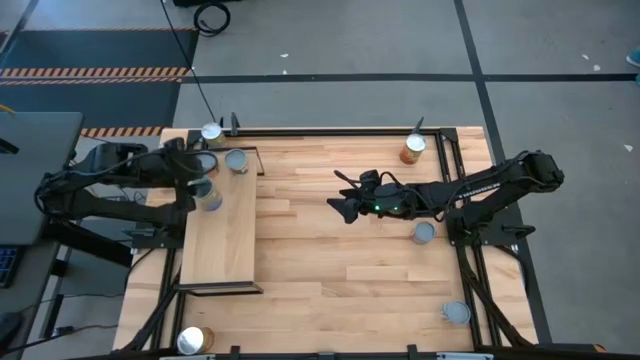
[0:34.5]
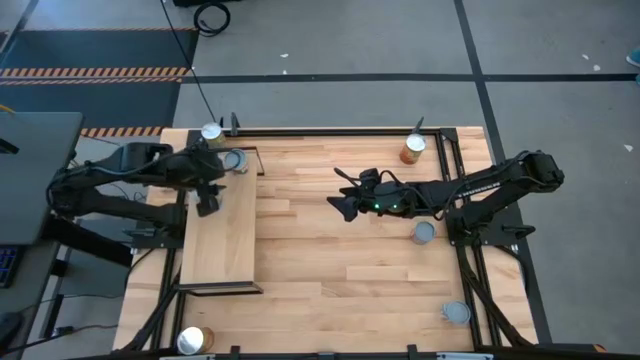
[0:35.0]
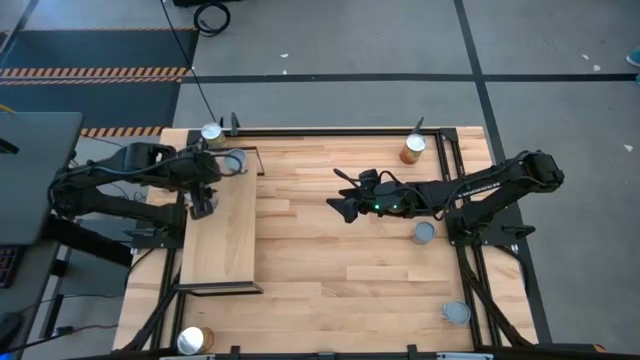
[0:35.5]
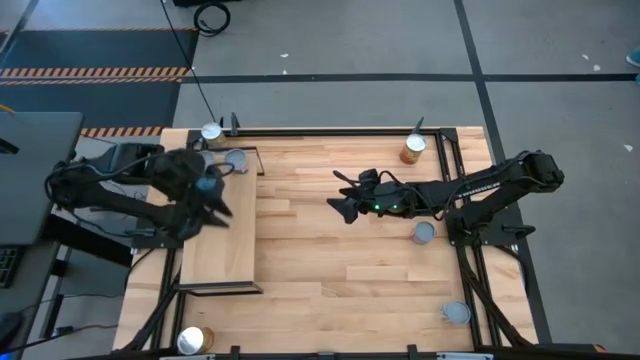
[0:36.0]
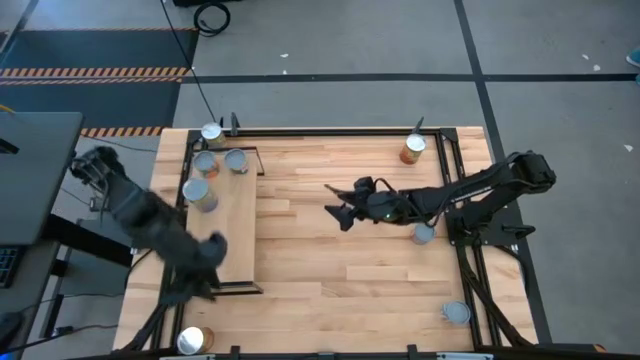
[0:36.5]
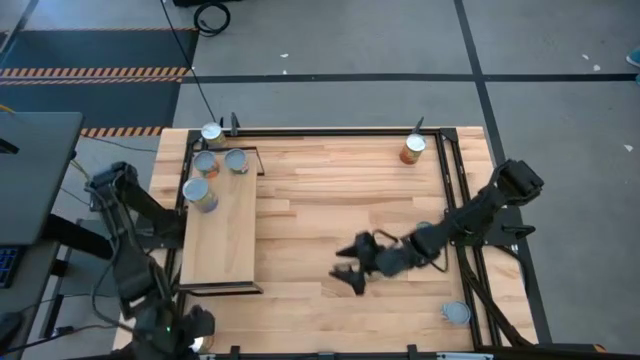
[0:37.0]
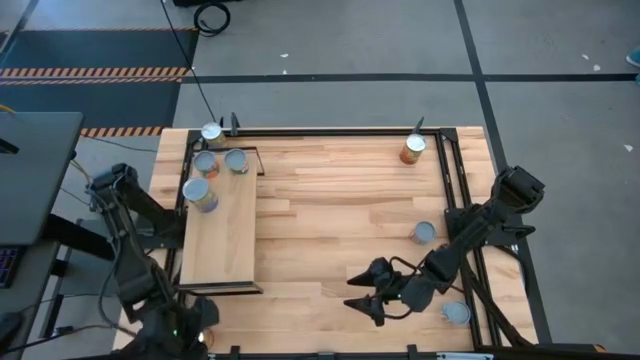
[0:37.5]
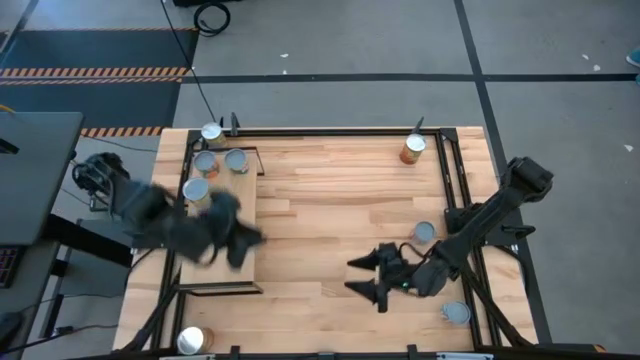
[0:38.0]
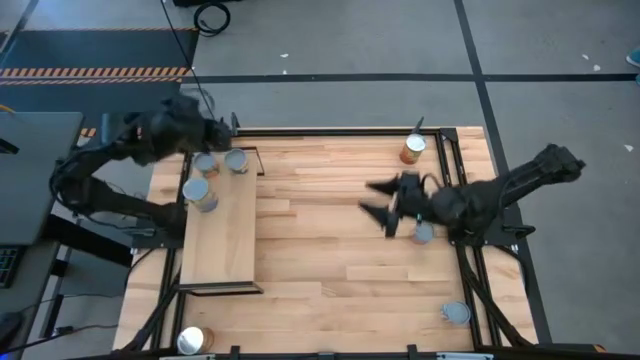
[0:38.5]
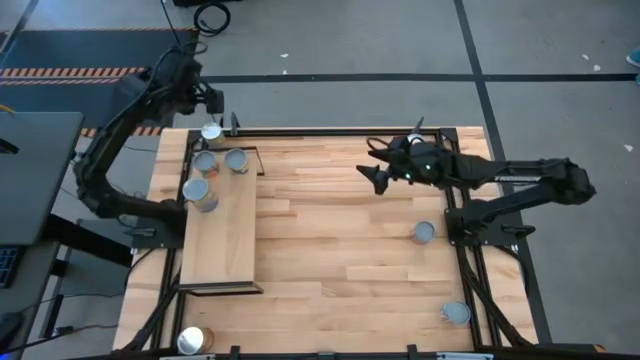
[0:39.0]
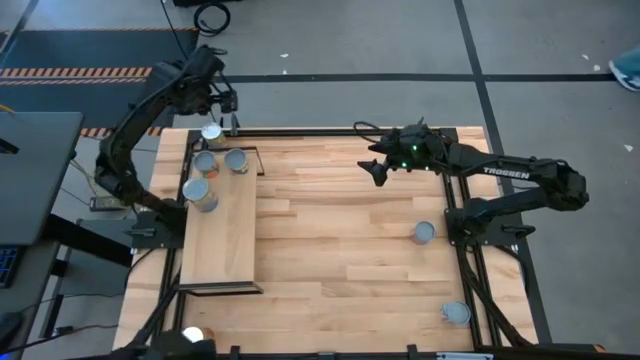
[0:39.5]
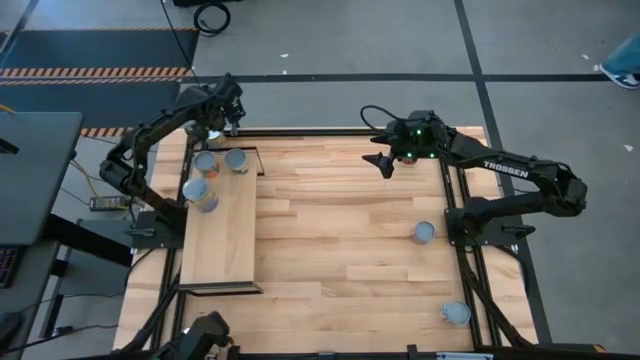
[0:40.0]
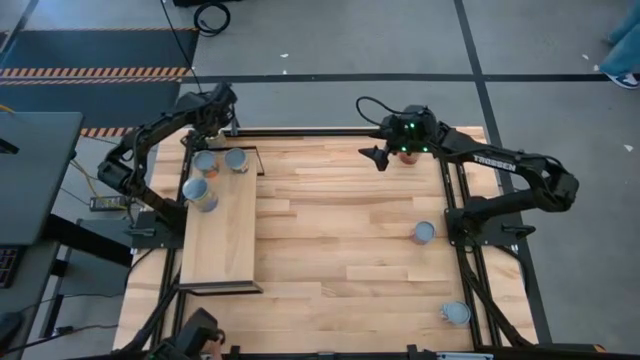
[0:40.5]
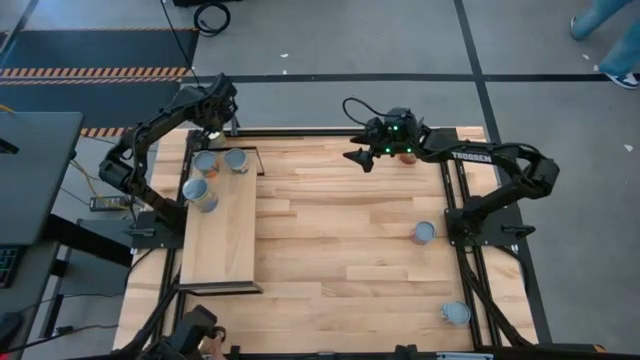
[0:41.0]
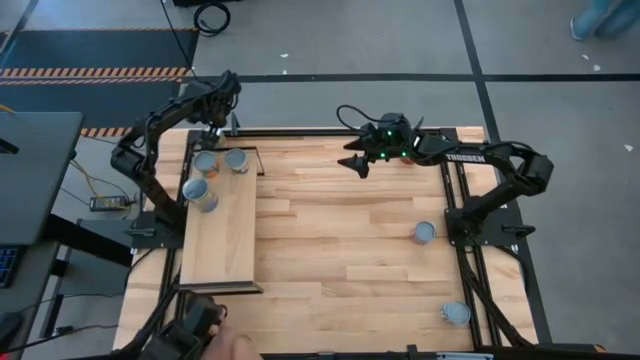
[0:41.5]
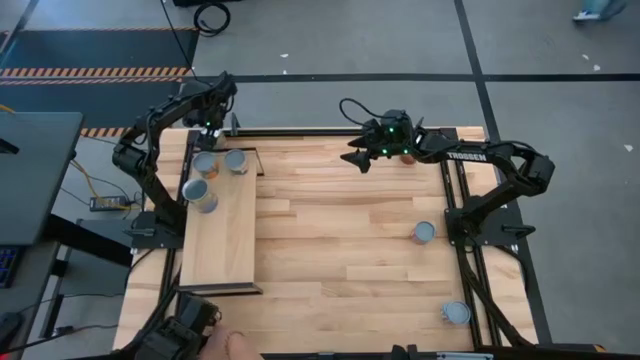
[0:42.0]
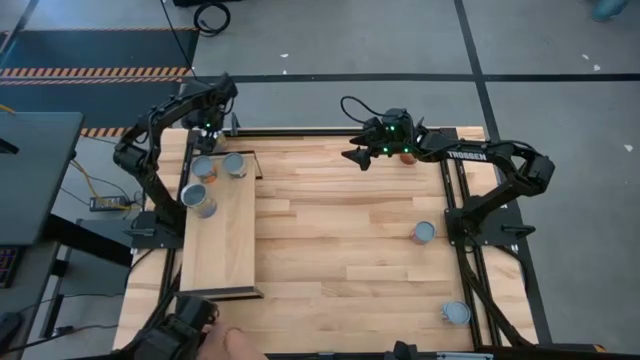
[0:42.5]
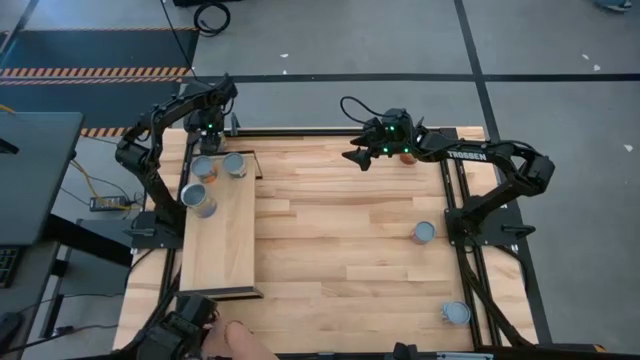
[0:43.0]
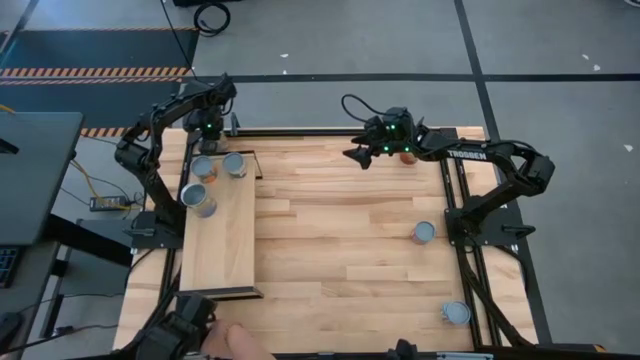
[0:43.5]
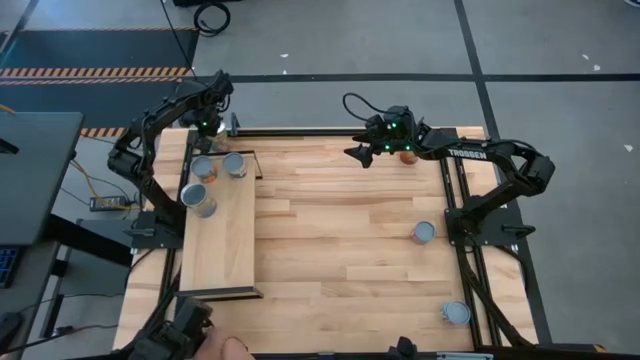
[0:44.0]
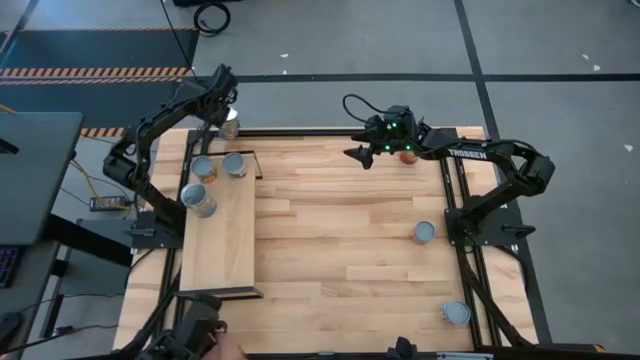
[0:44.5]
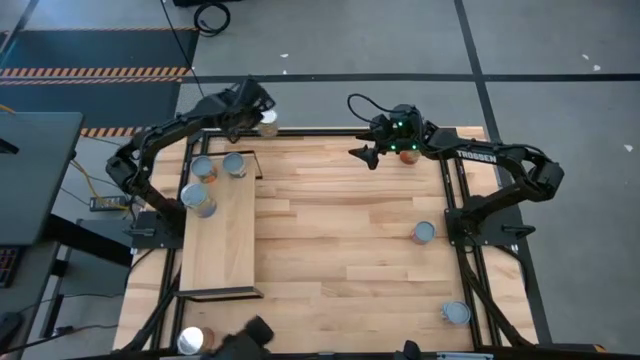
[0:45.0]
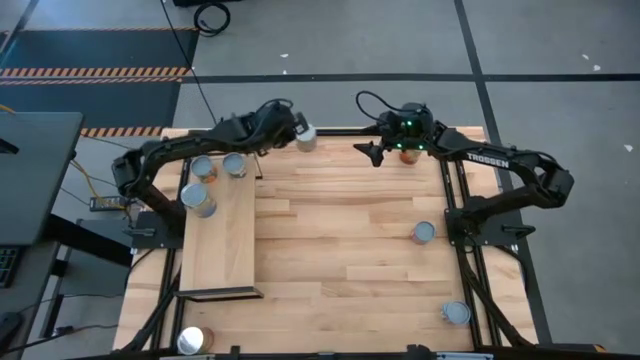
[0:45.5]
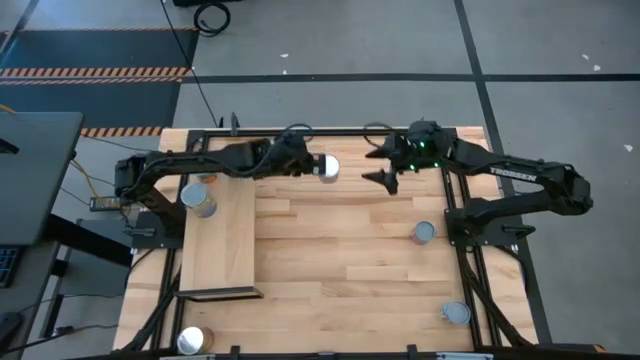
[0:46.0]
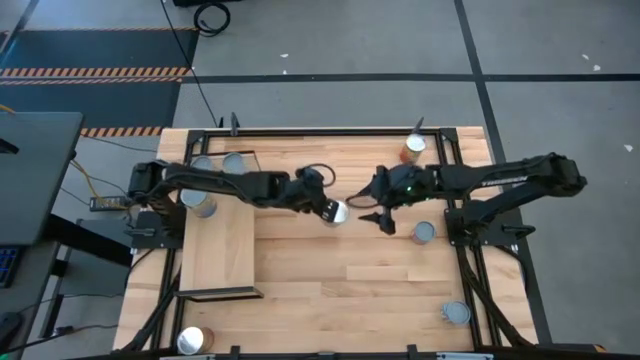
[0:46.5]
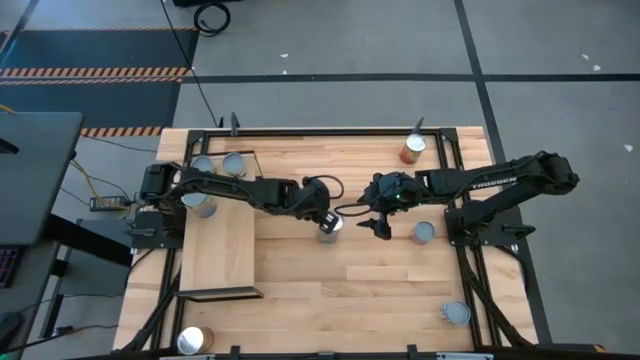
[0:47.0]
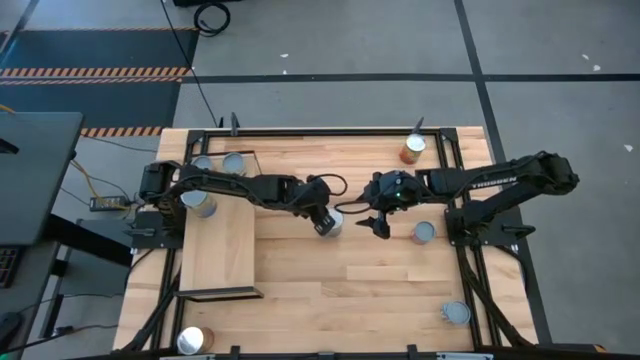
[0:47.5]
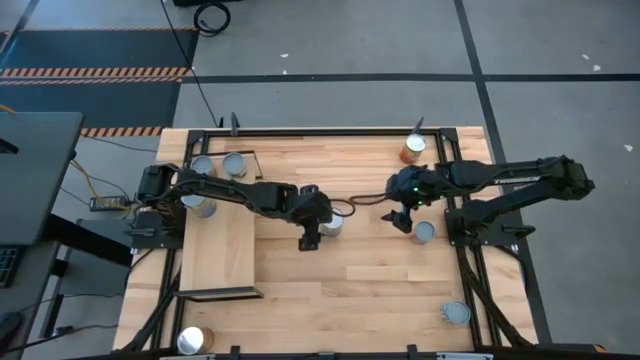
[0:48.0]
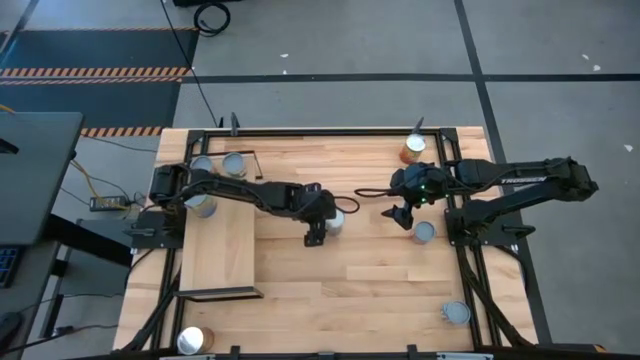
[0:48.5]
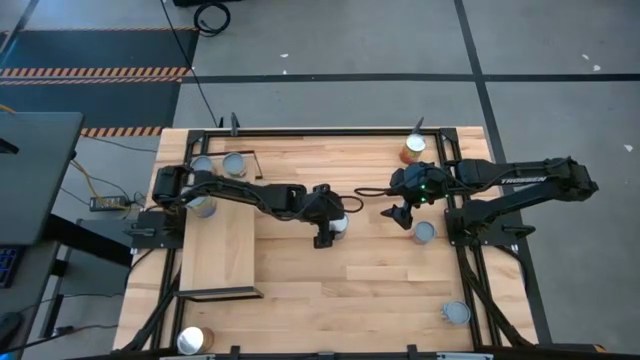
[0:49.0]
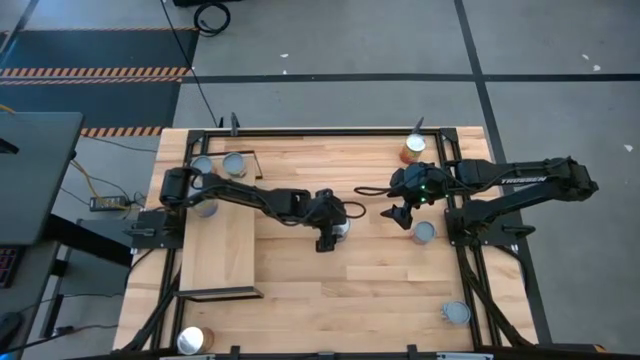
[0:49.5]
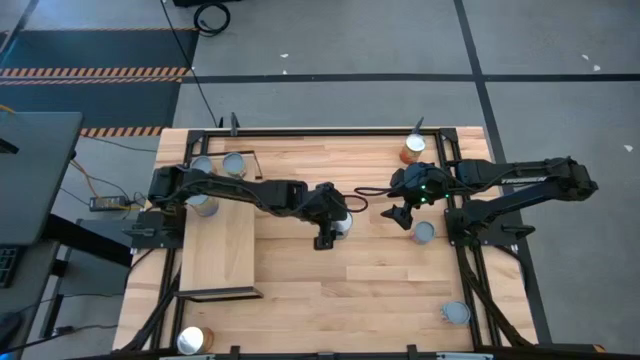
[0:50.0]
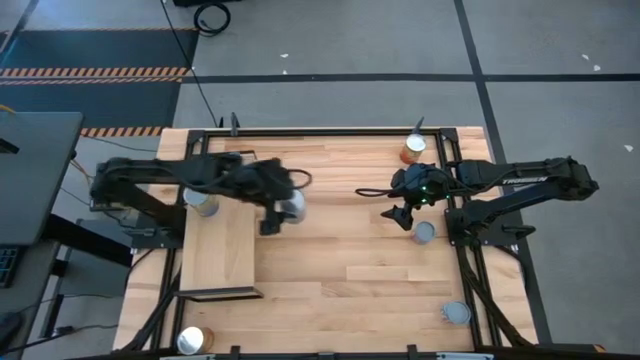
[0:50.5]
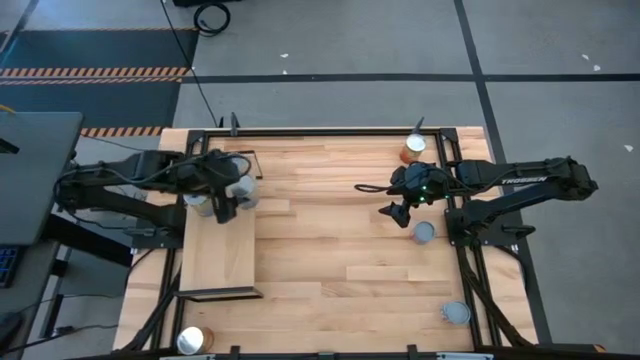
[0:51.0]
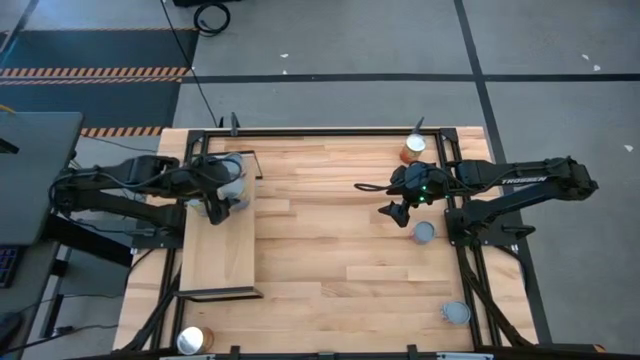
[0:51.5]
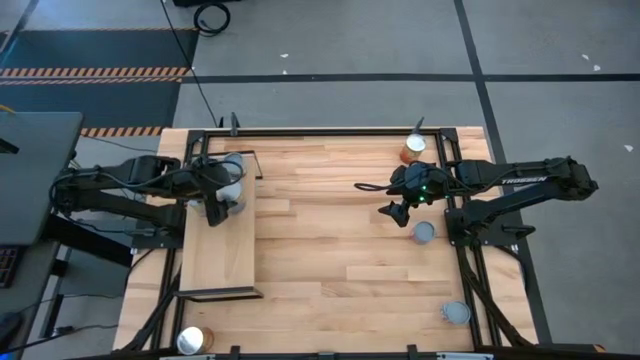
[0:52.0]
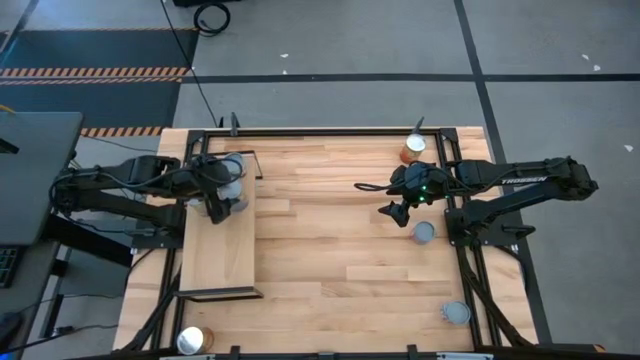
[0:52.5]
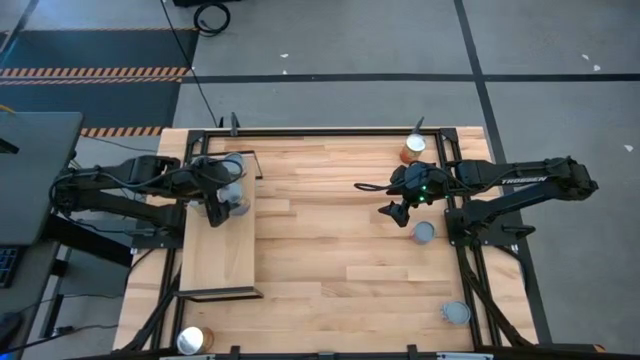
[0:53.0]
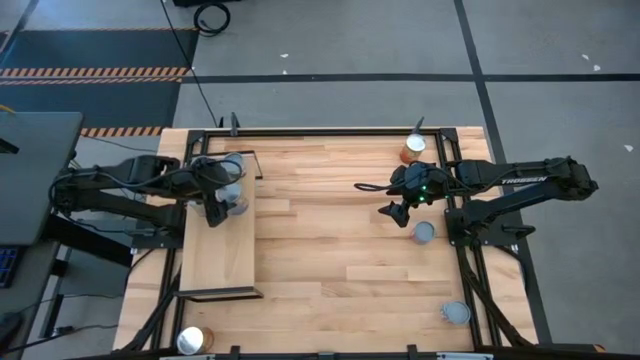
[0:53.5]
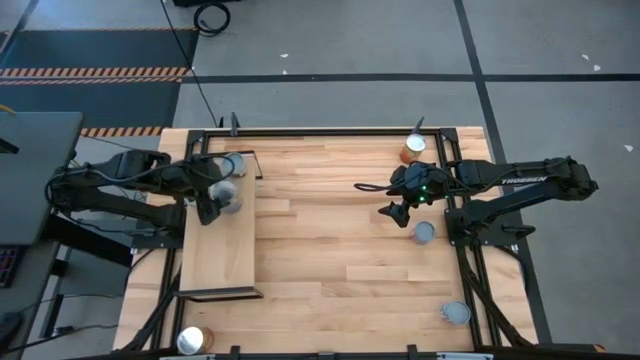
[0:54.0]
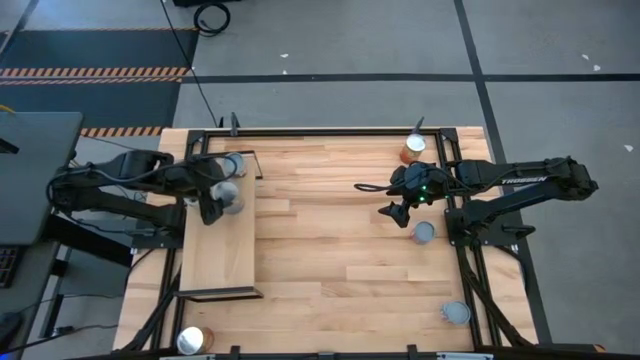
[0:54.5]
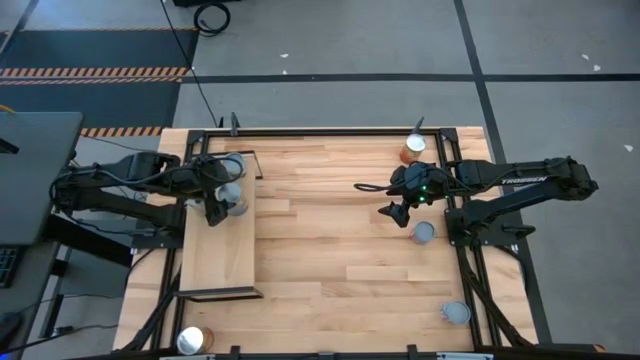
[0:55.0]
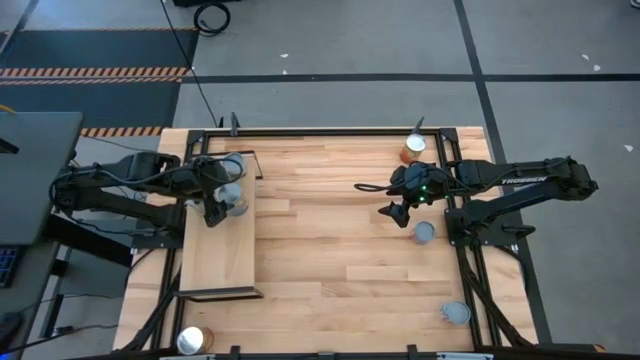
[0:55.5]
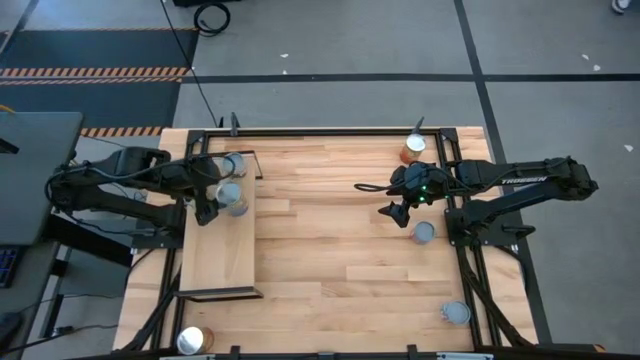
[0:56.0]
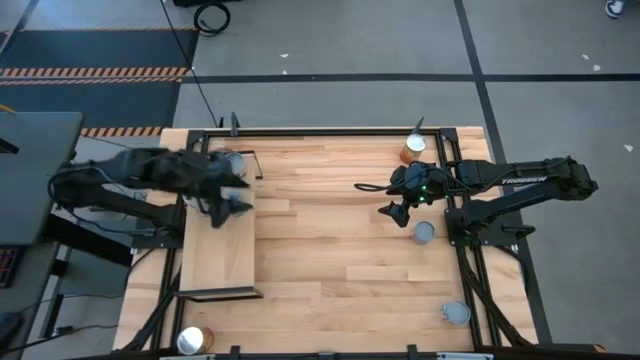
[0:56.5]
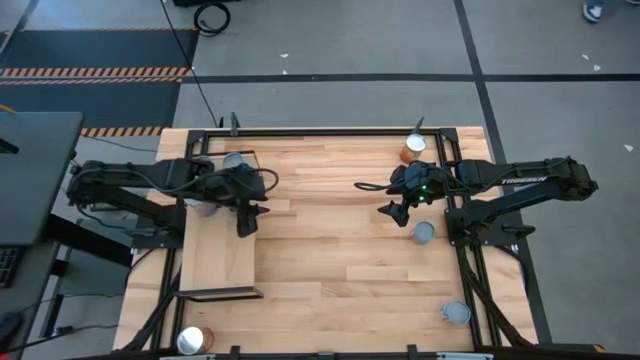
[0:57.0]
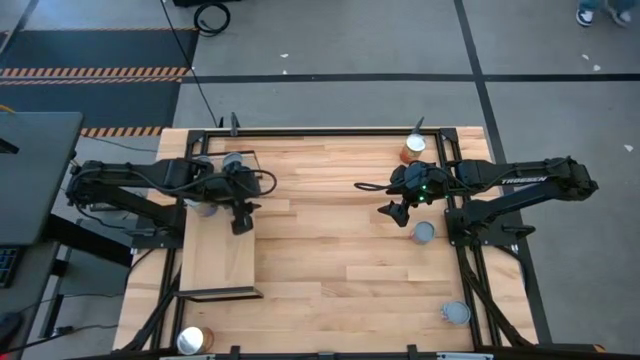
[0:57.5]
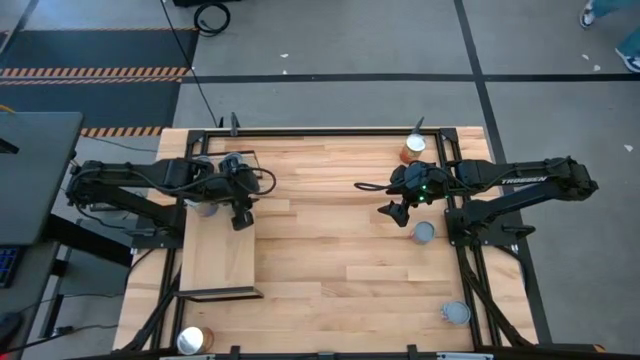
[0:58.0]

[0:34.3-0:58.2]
Task: Pick and place cans onto a shelf
Put the canned peaches on the shelf aligned with the other canned peaches
